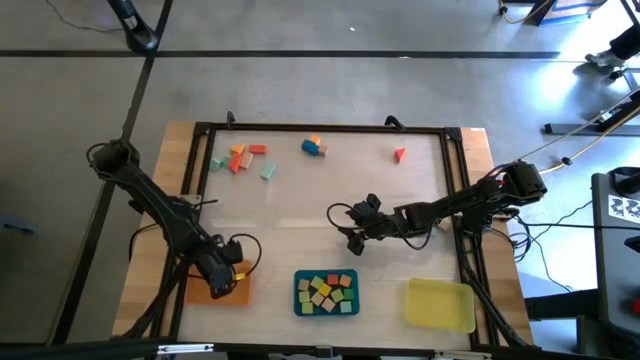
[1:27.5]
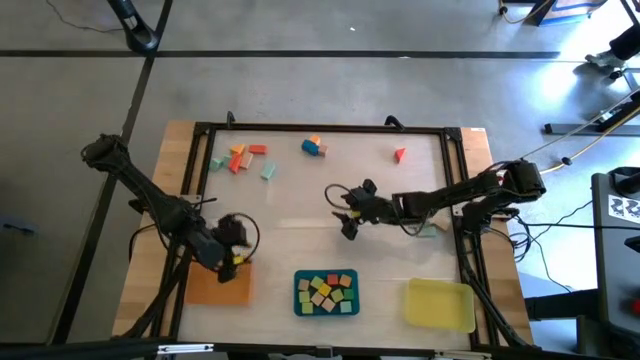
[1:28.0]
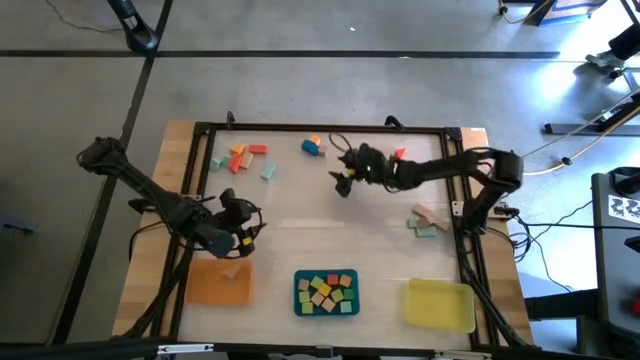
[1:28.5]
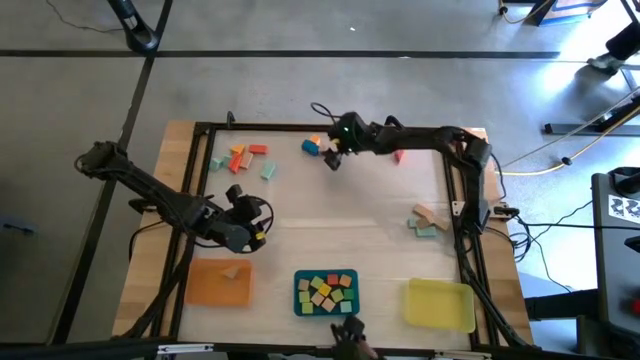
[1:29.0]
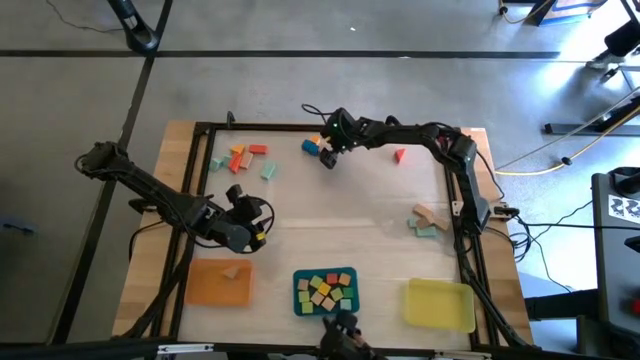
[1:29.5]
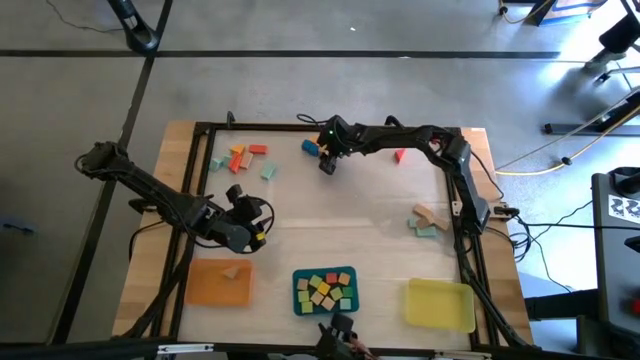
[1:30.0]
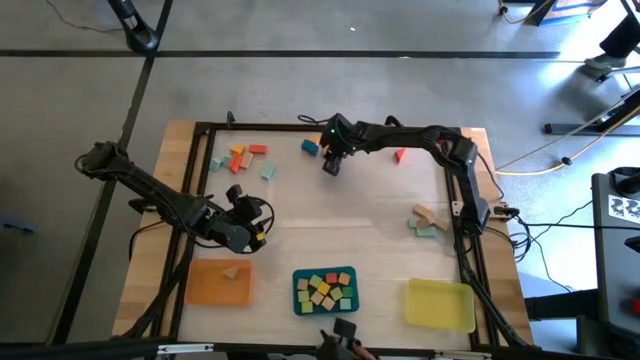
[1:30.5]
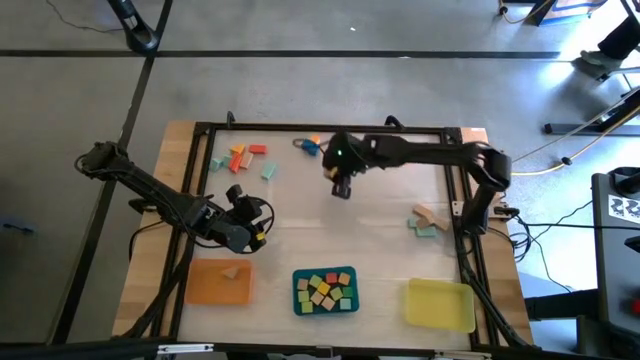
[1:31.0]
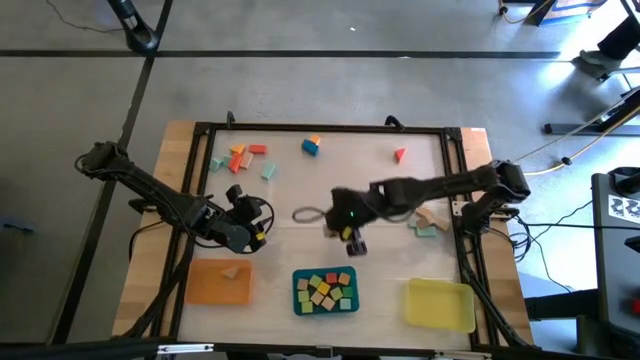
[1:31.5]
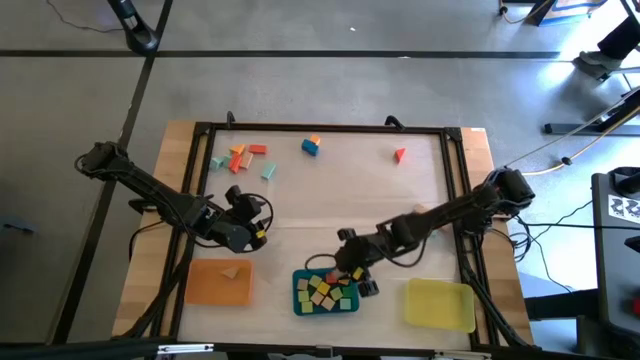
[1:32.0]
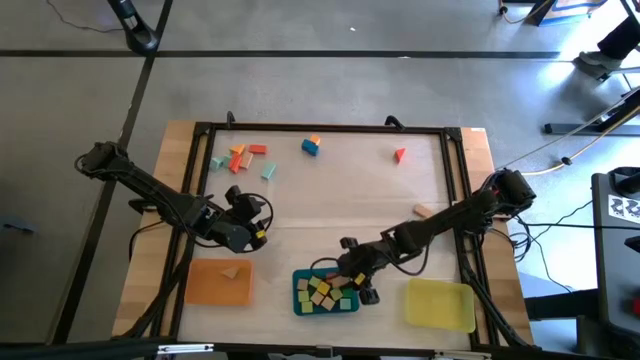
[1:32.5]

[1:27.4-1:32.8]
Task: Sort blocks by size
Put the brown cube block into the blue bin

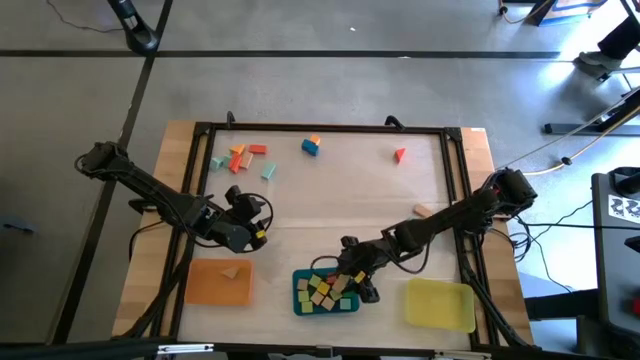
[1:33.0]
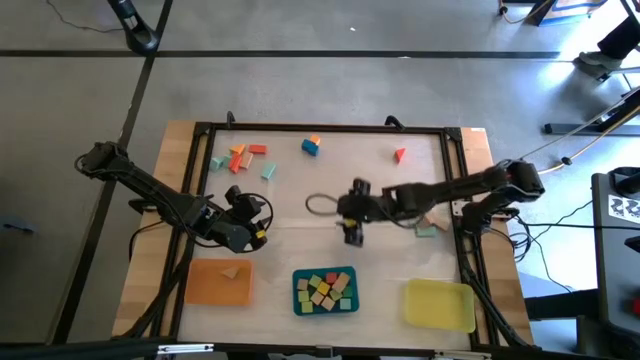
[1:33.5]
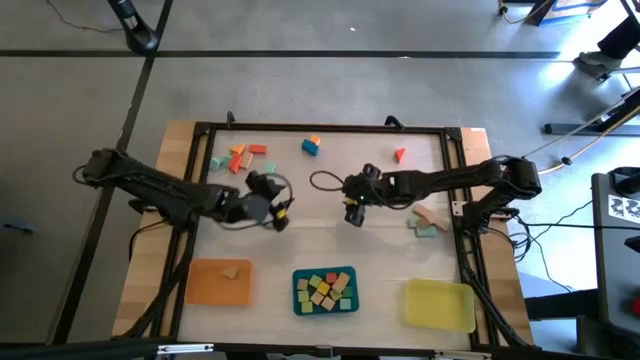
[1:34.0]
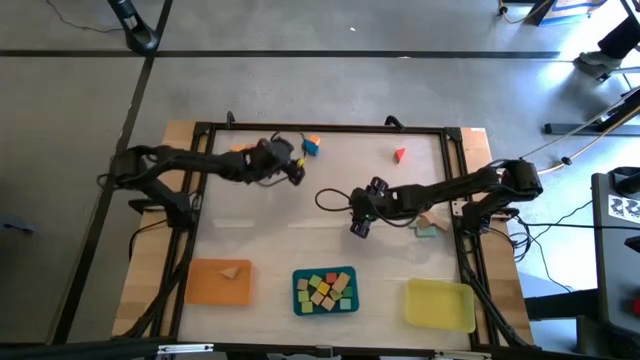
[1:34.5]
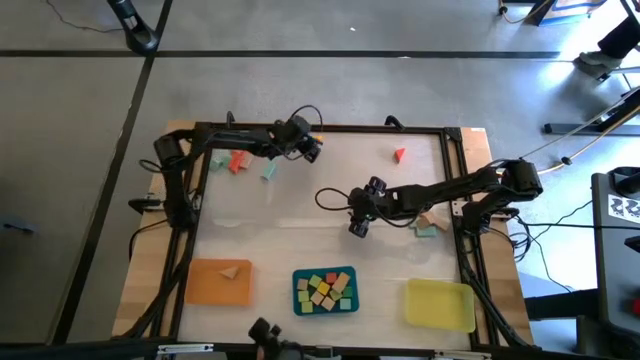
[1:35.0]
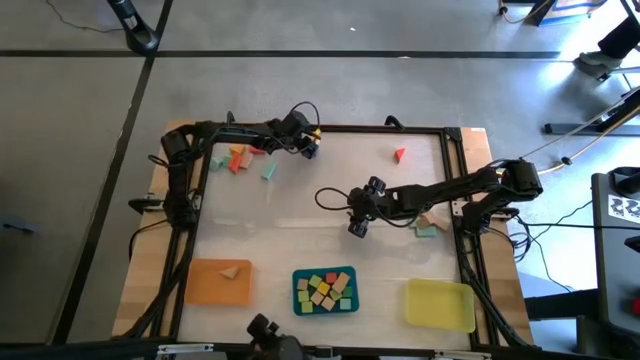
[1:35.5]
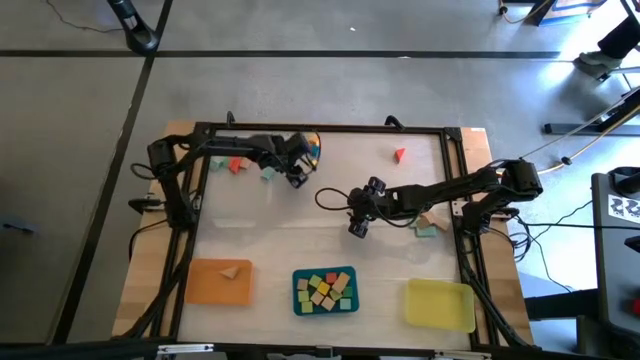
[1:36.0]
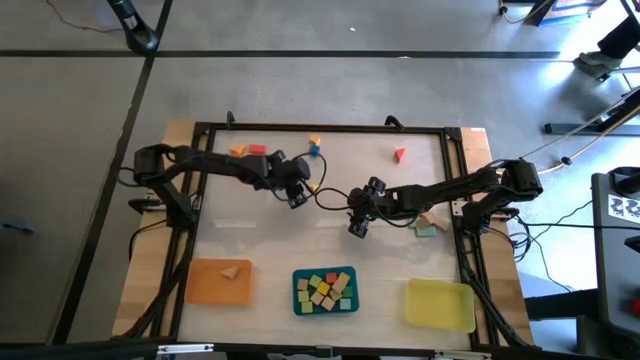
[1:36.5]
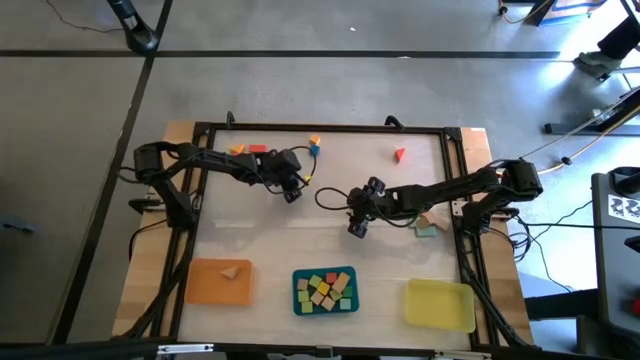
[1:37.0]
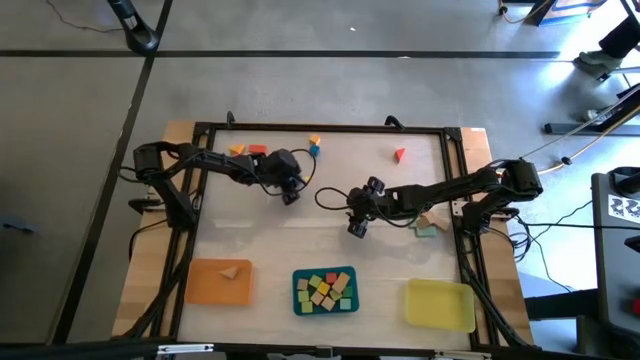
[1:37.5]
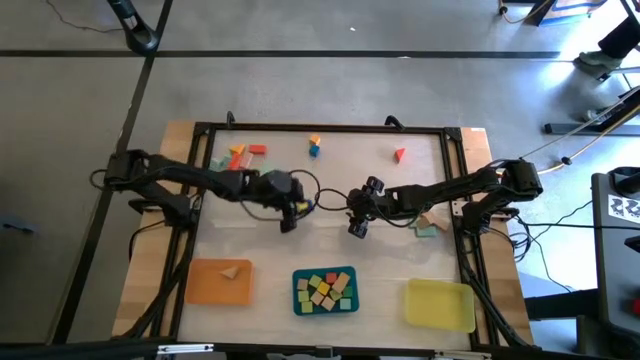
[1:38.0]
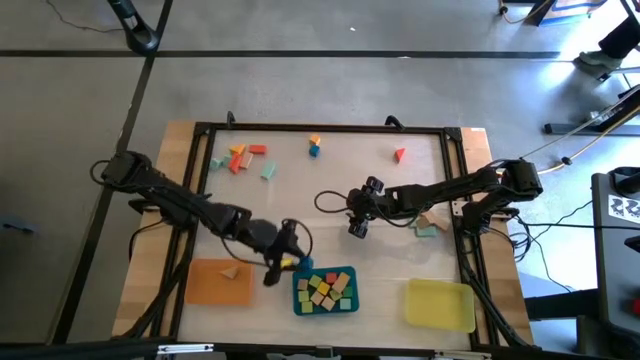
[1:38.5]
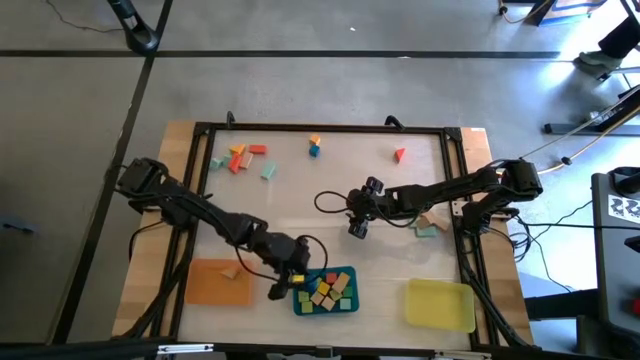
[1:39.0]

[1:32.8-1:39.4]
Put the blue cube block into the blue bin

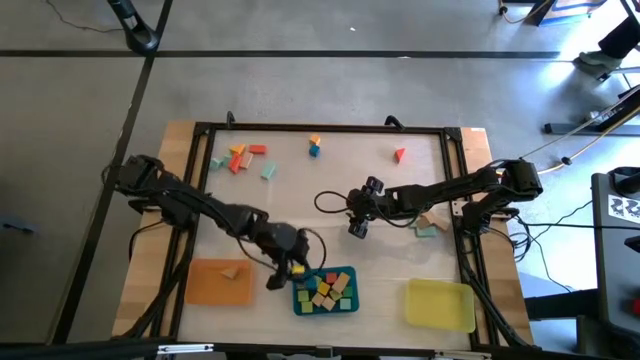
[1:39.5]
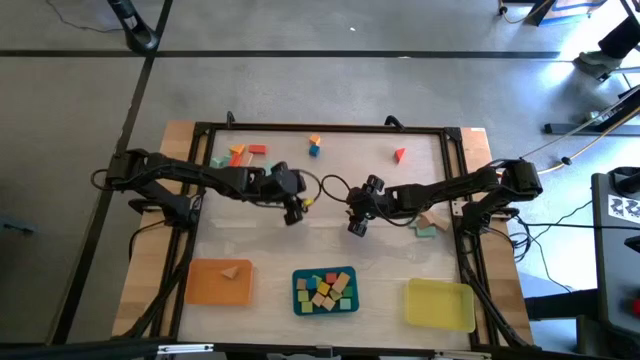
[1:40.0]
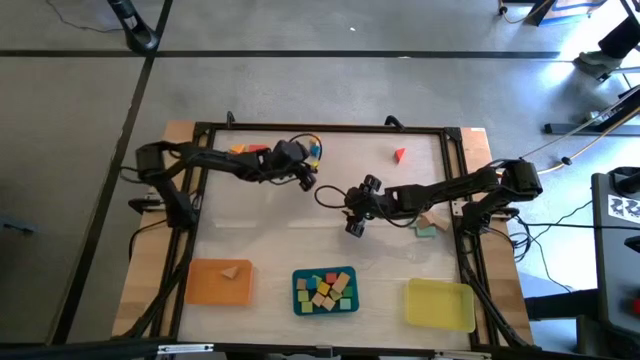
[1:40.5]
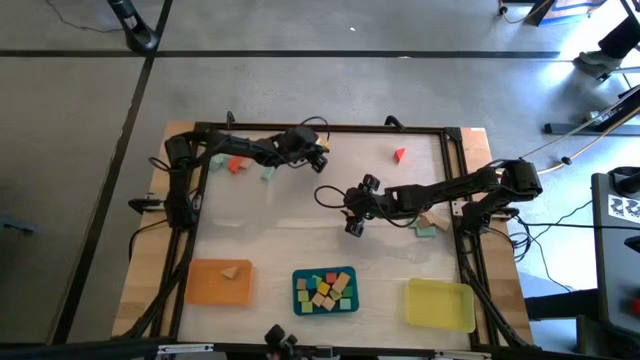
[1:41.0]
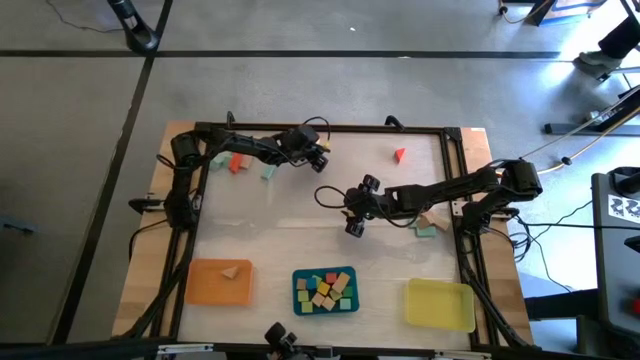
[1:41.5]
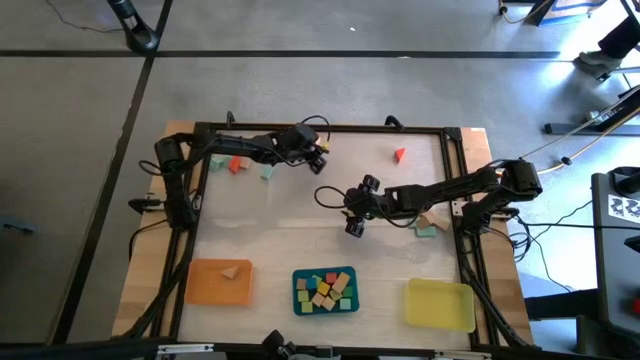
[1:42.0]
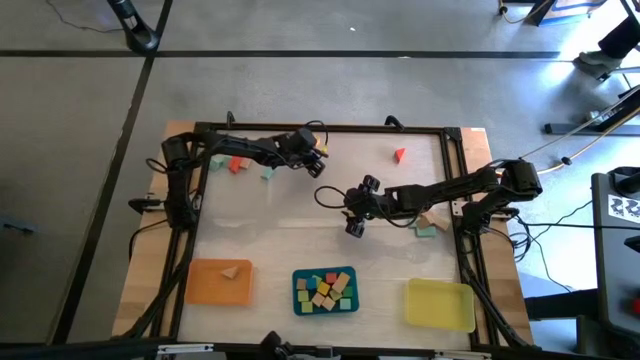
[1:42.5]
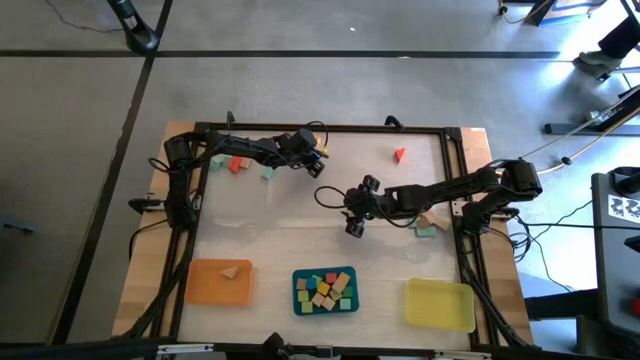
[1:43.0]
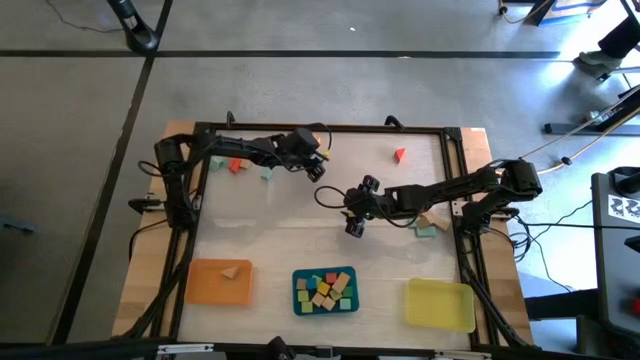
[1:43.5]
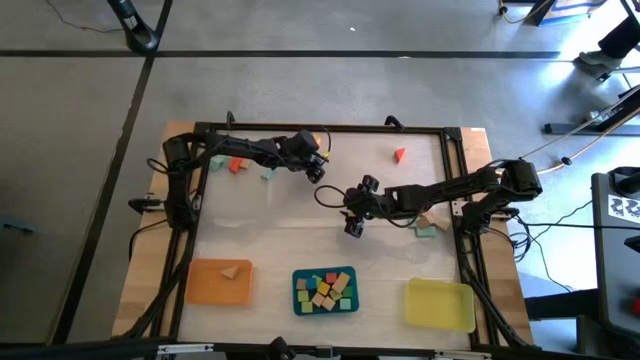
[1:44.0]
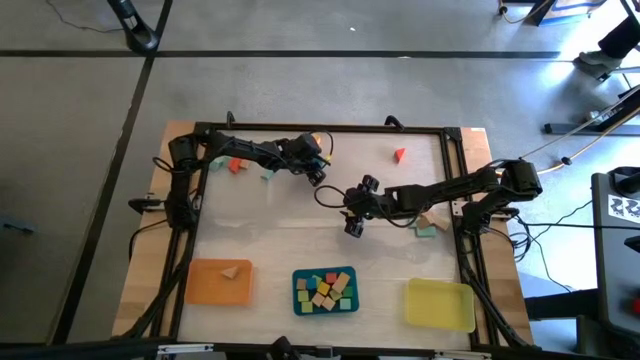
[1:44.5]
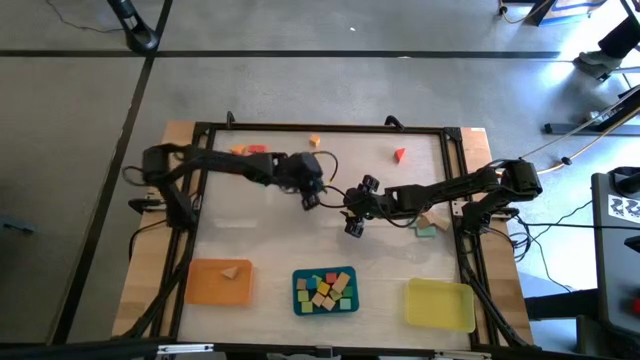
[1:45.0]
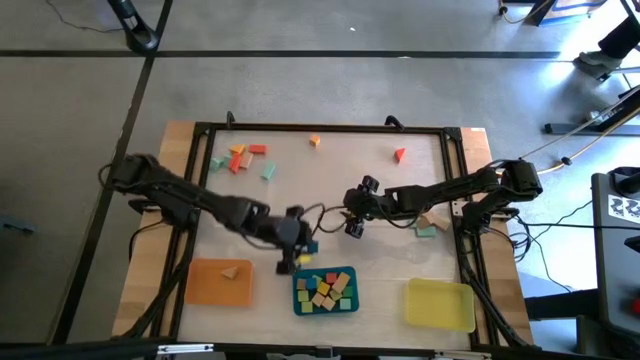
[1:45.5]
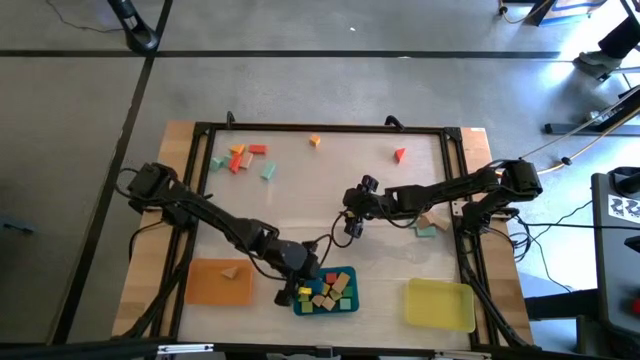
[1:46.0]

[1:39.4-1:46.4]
Put the blue cube block into the blue bin
